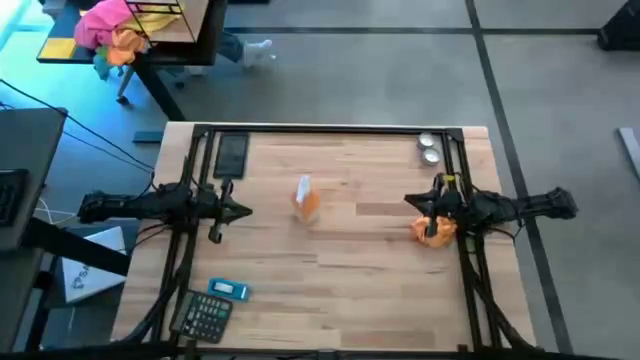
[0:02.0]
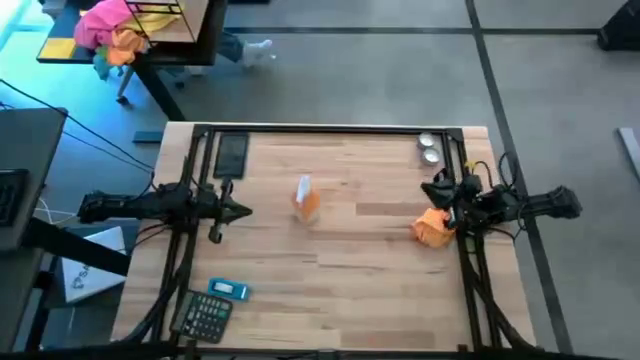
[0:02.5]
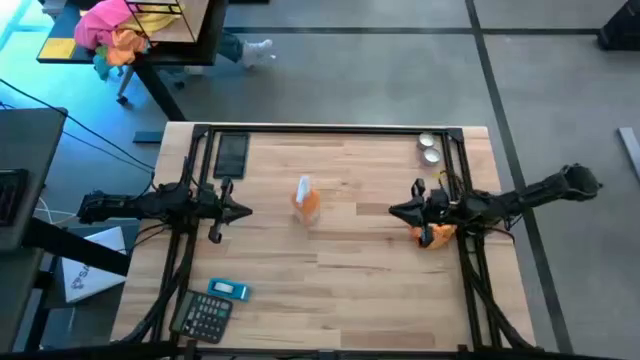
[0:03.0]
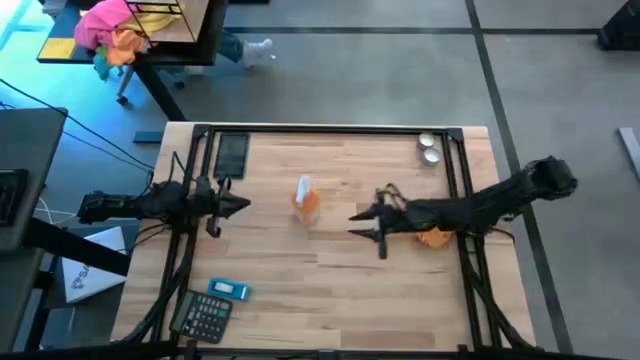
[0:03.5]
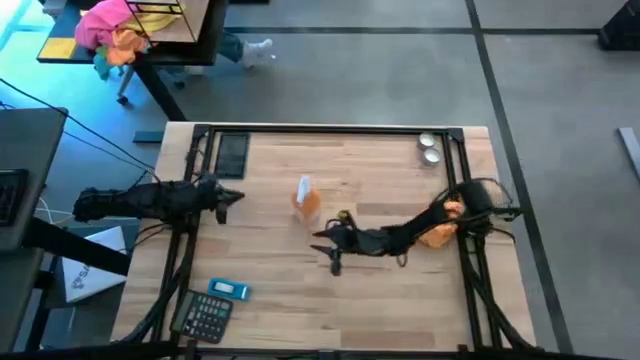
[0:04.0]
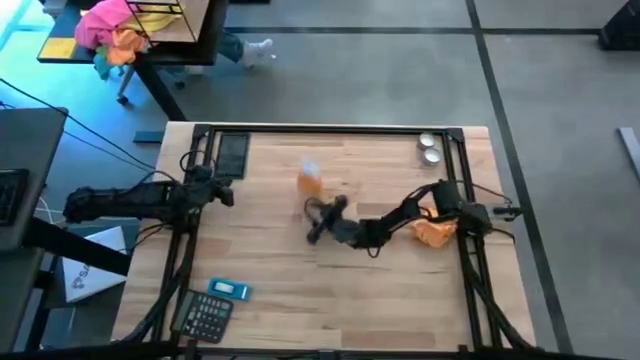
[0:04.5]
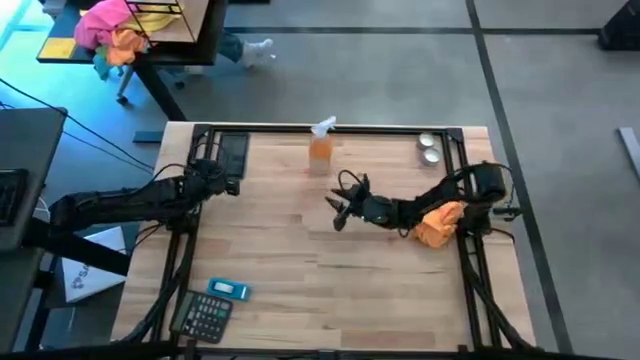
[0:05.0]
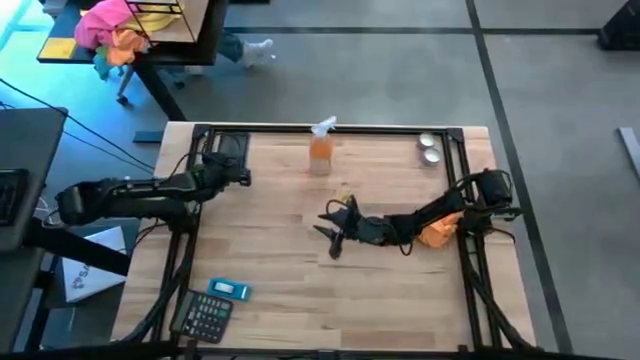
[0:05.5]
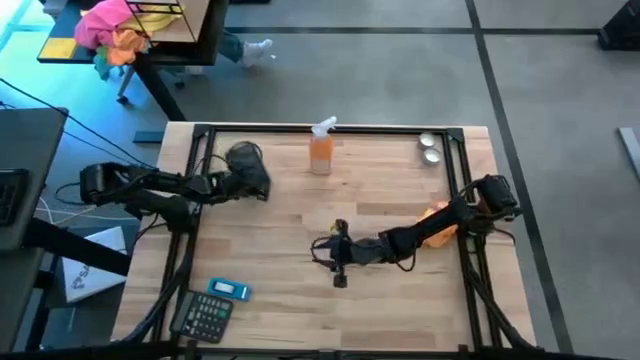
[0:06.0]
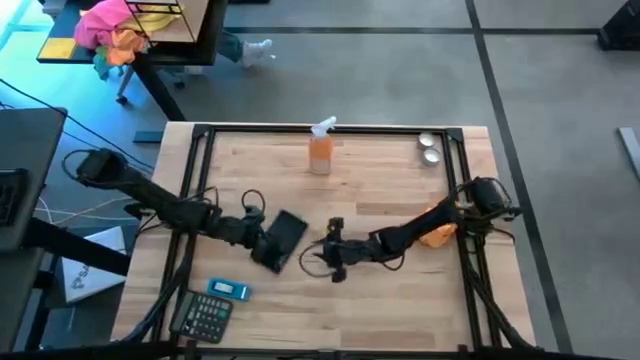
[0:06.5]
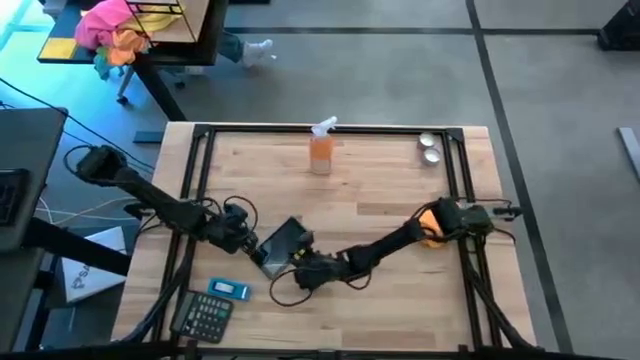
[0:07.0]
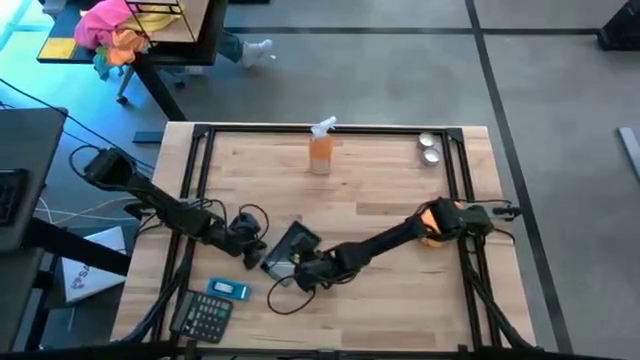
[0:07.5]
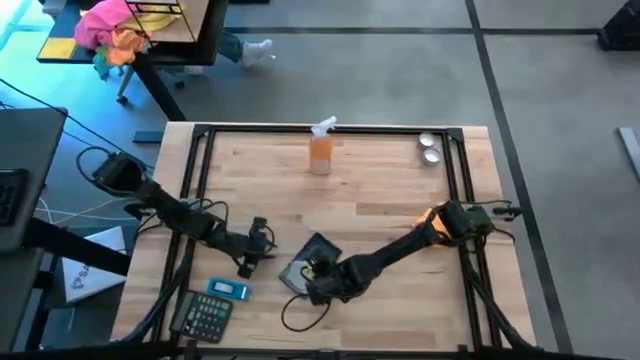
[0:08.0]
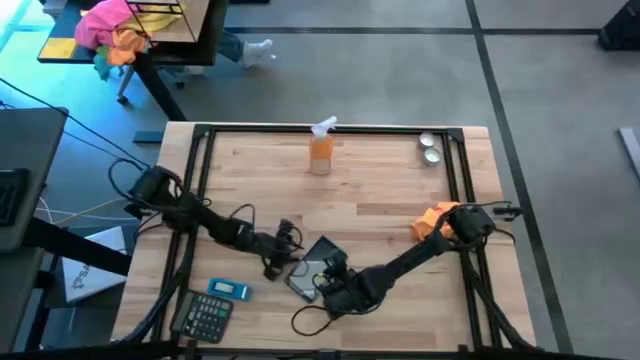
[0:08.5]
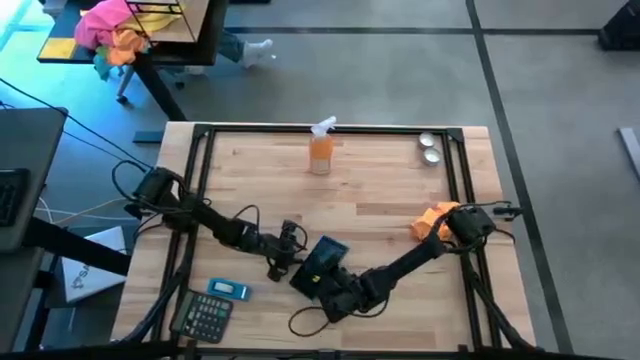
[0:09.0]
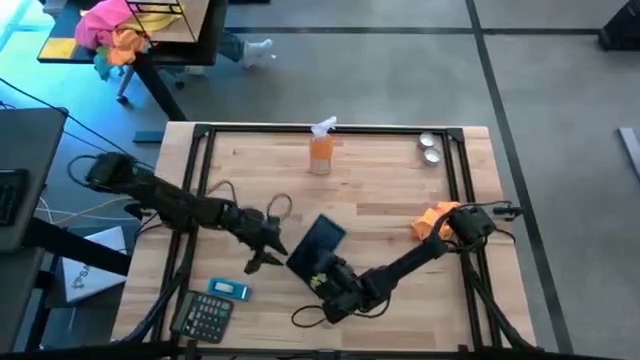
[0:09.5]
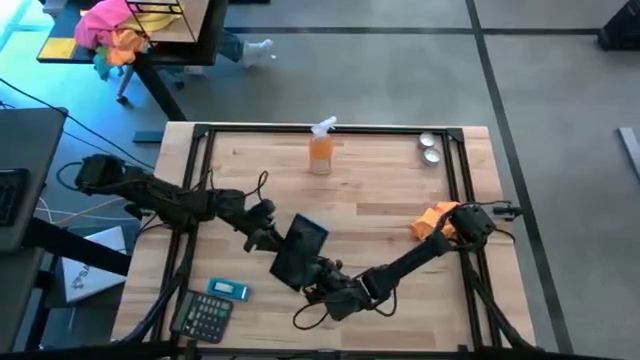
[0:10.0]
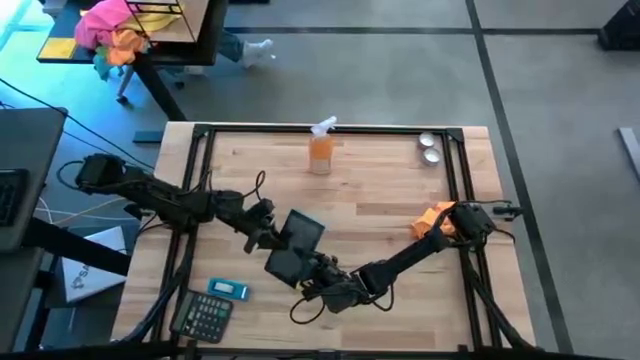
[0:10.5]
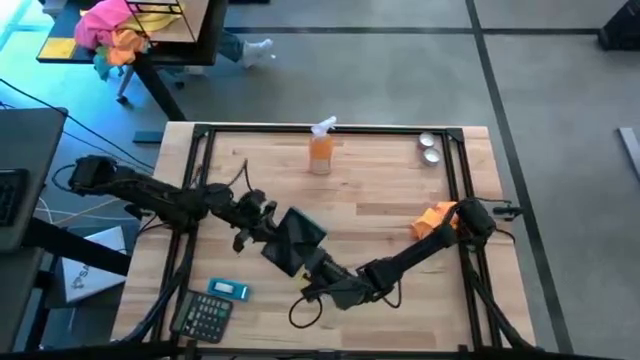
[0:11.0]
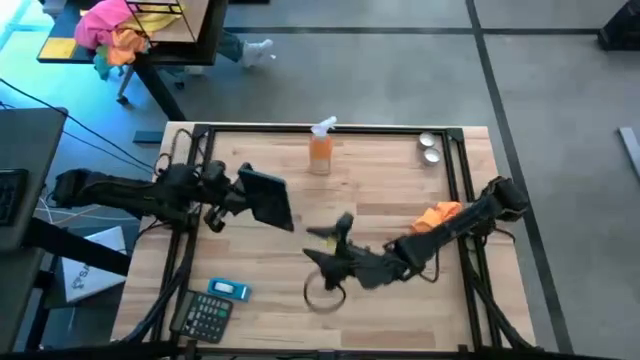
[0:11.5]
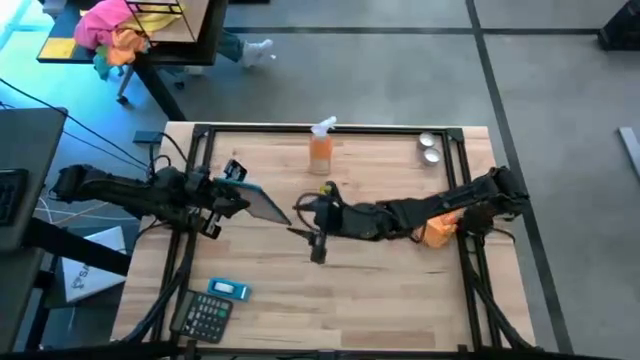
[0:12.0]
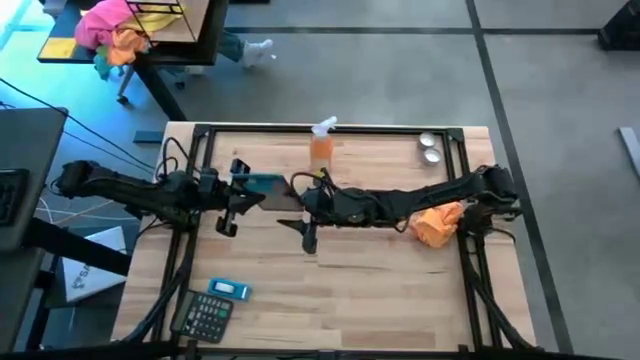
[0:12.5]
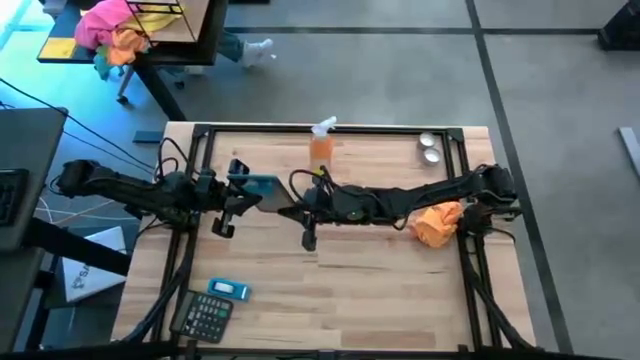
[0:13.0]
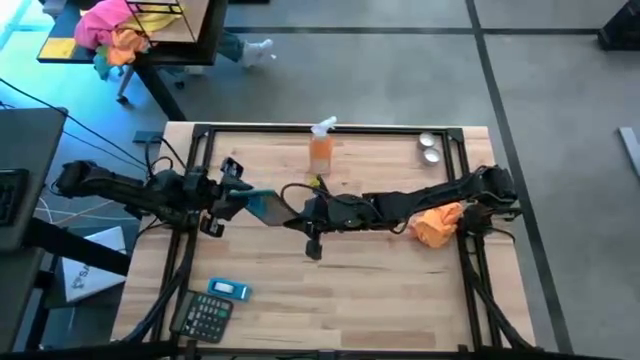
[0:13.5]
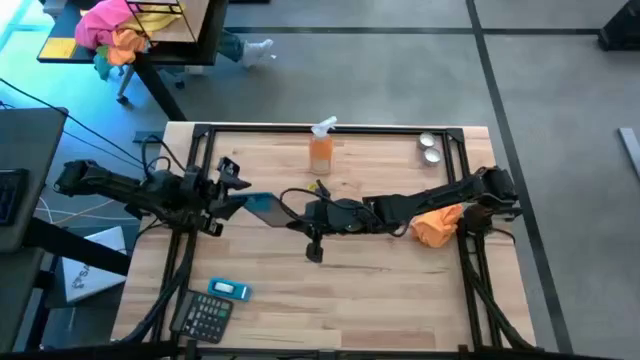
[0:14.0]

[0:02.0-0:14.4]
Task: Apply microfiber cloth
Spray the tablet using the spray bottle

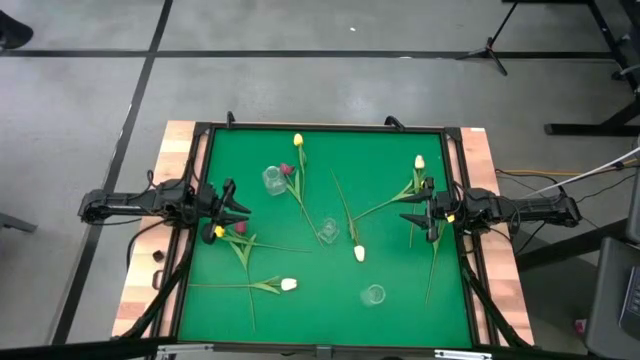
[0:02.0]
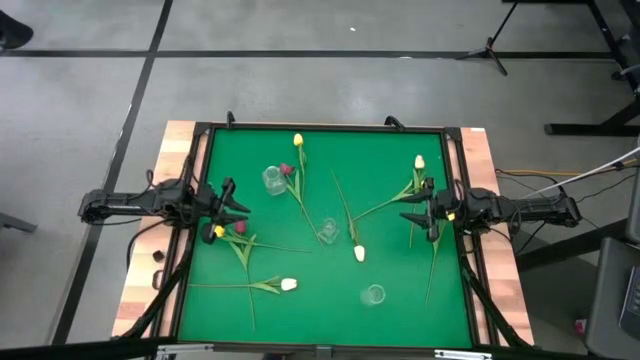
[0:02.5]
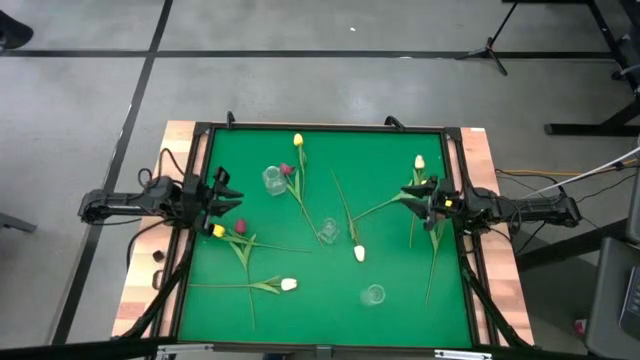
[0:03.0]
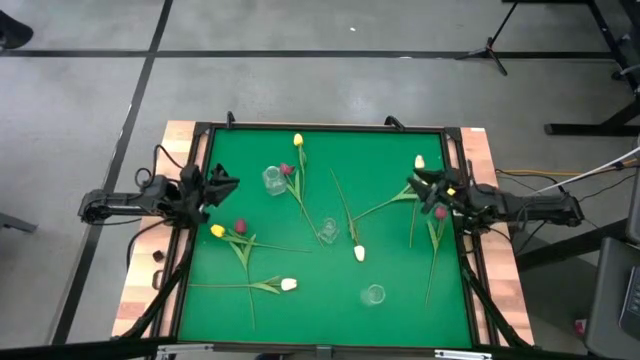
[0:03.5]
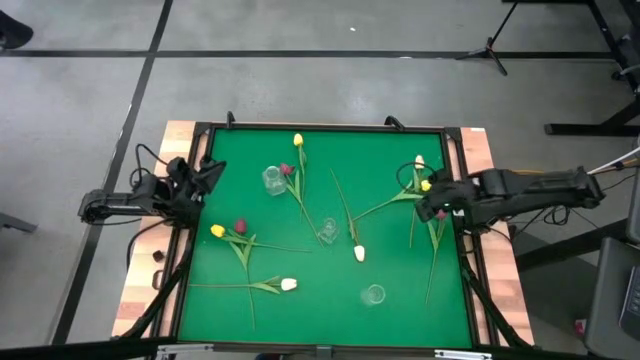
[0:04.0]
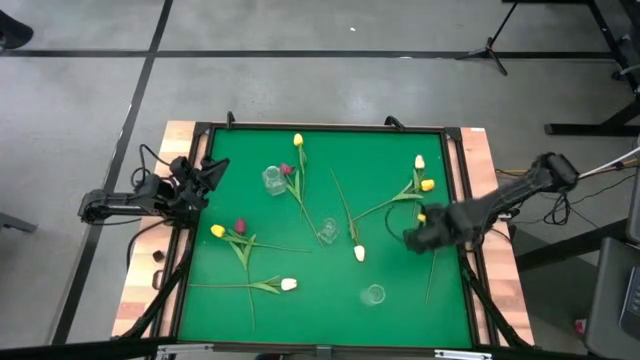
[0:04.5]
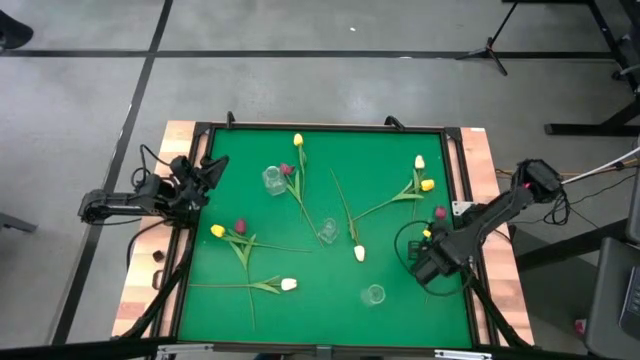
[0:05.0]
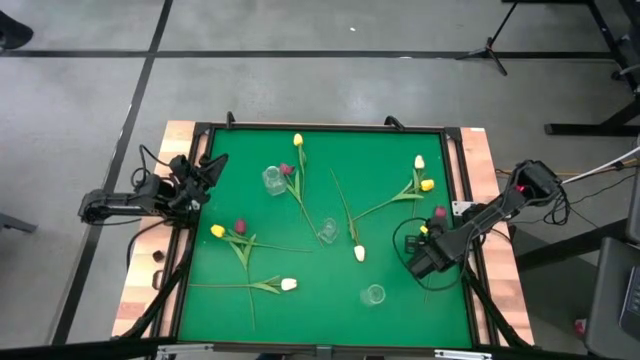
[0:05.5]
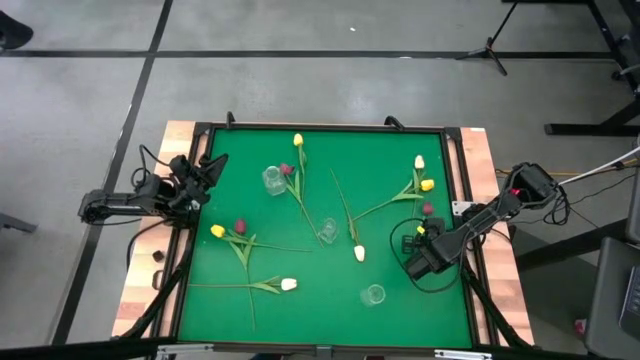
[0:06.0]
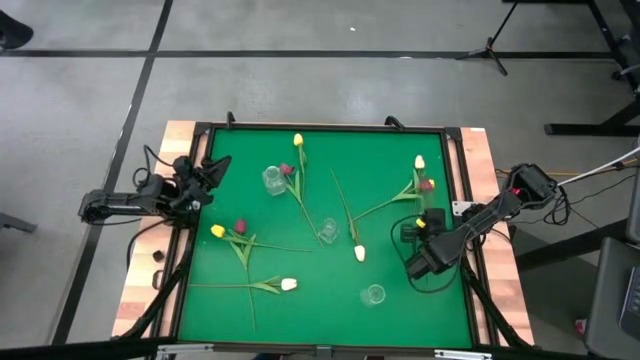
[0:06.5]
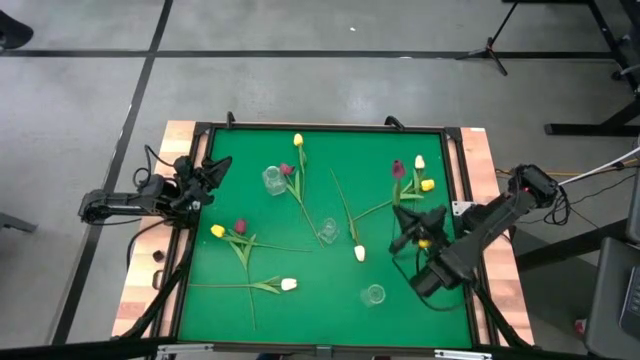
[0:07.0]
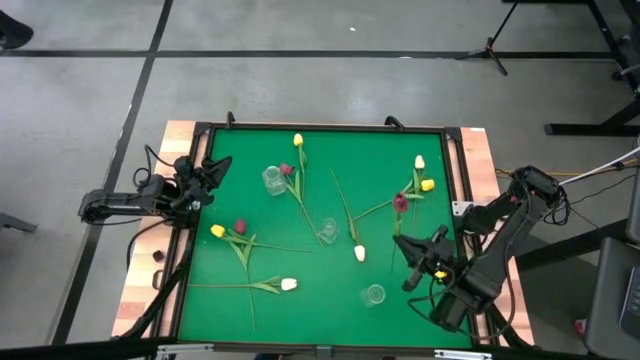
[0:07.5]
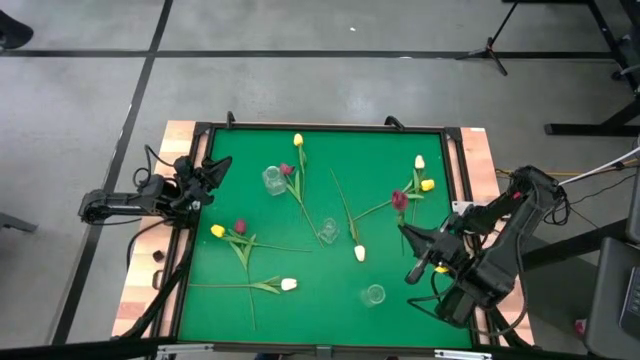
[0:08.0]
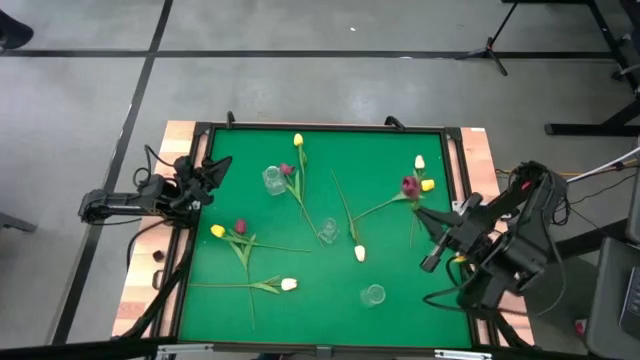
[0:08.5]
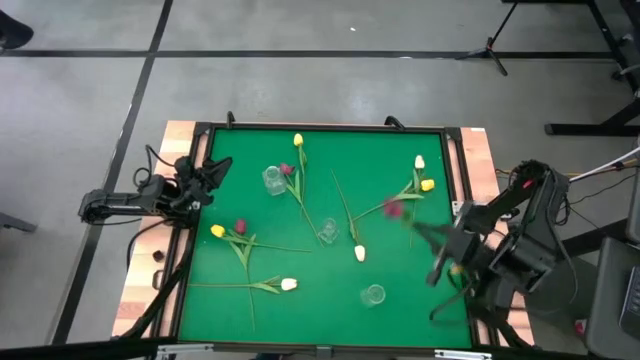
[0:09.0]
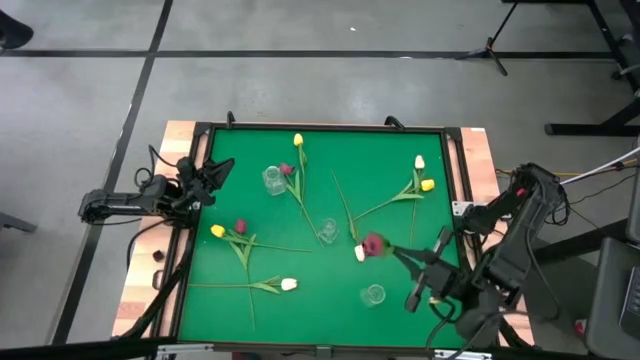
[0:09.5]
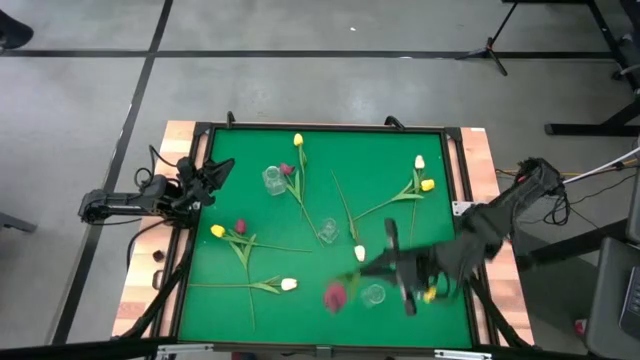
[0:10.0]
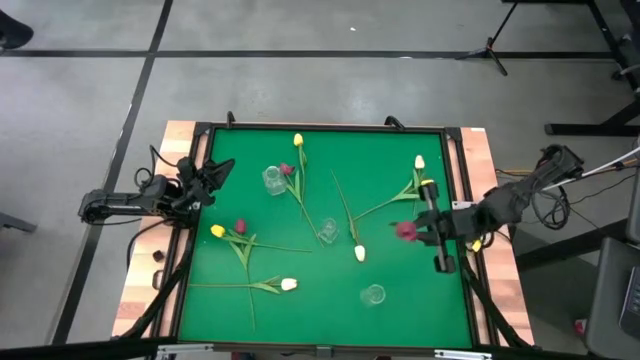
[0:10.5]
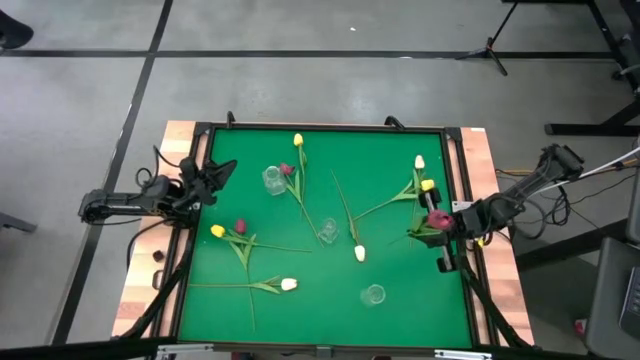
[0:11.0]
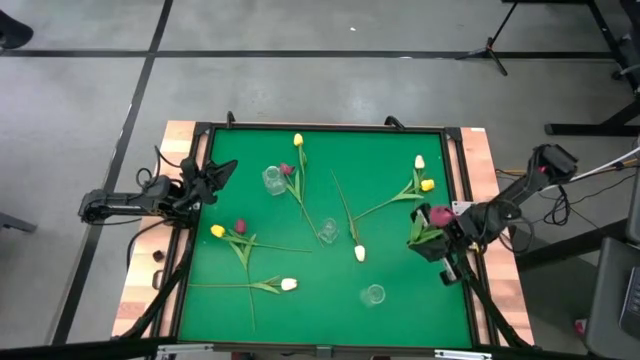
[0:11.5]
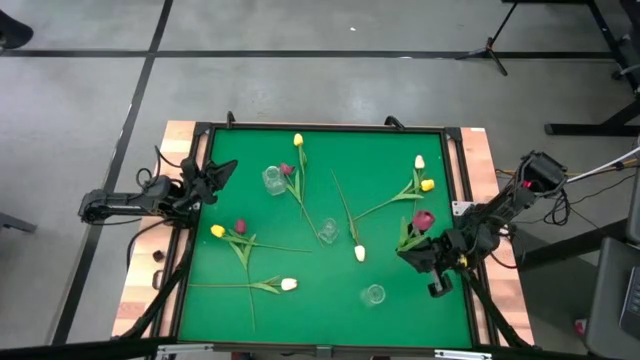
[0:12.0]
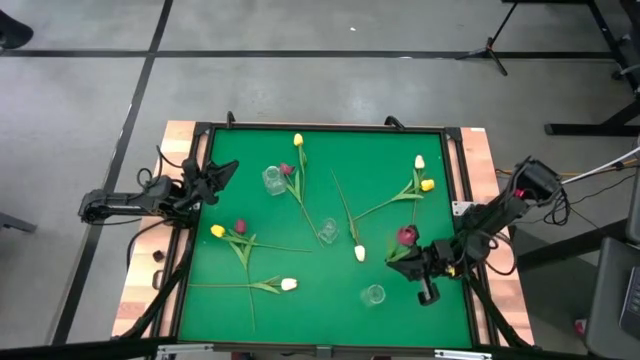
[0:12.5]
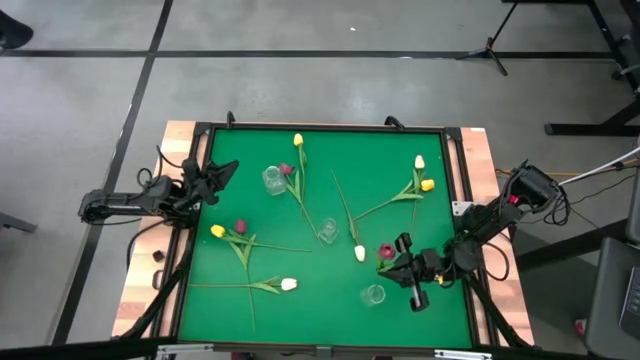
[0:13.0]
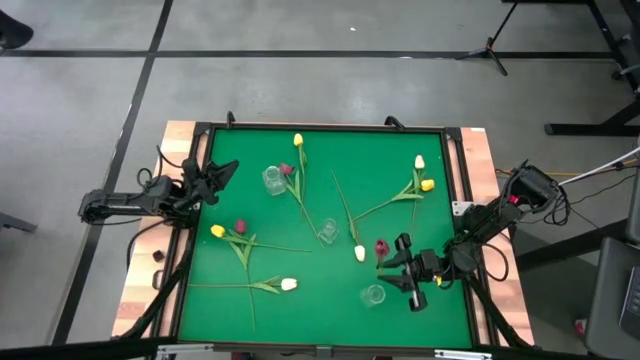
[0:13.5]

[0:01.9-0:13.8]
Task: Sort flowers into vase by color
Put the bottom right red tulip into the bottom right transparent vase
